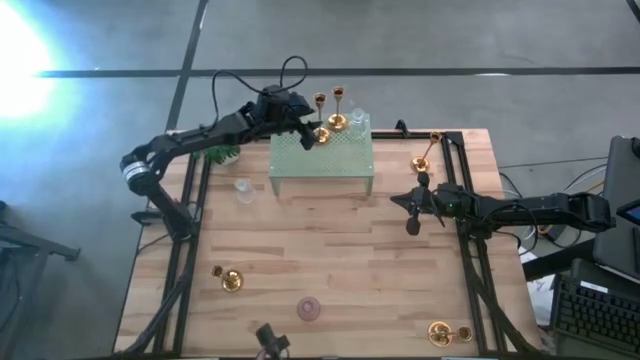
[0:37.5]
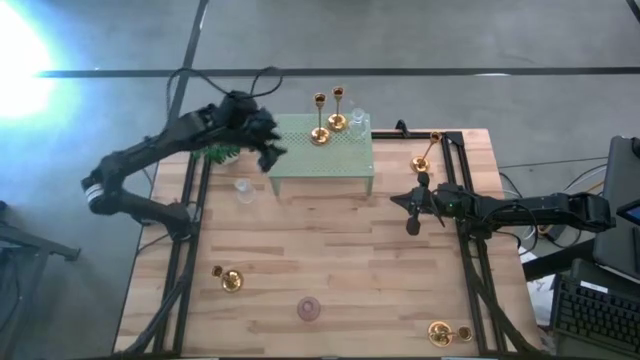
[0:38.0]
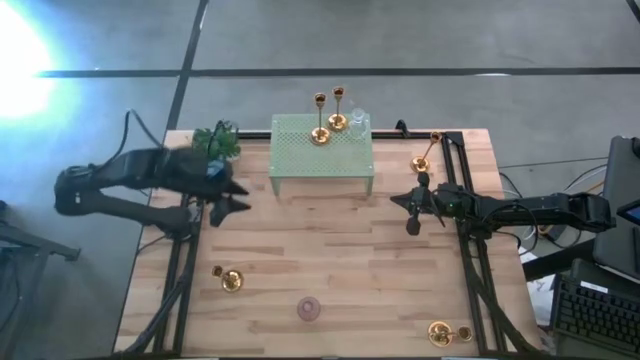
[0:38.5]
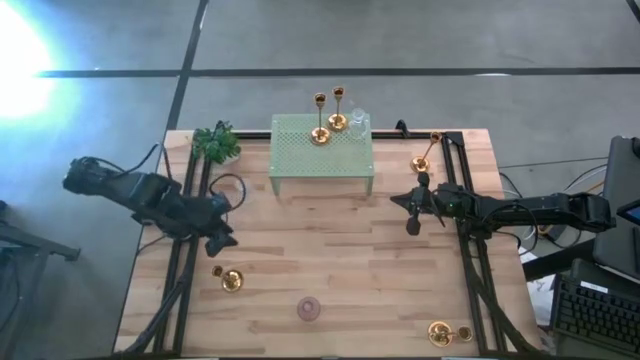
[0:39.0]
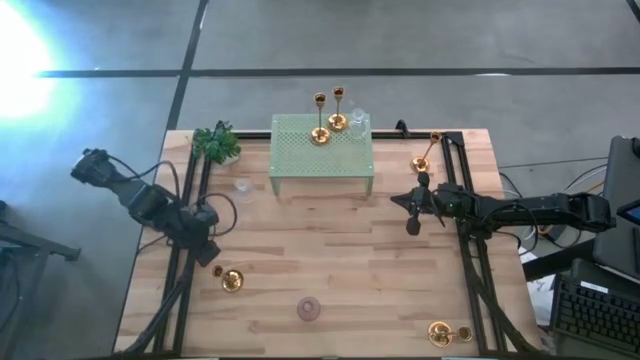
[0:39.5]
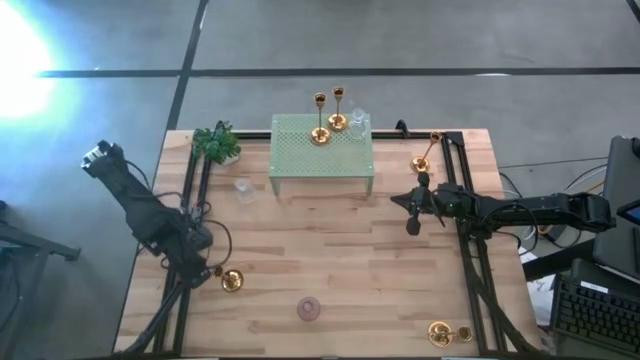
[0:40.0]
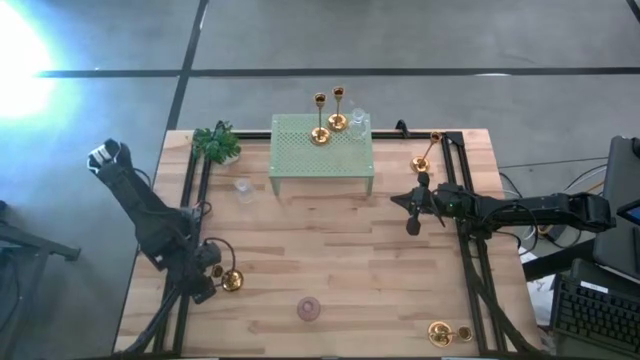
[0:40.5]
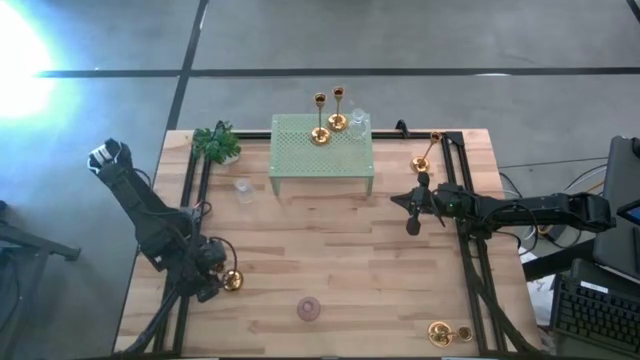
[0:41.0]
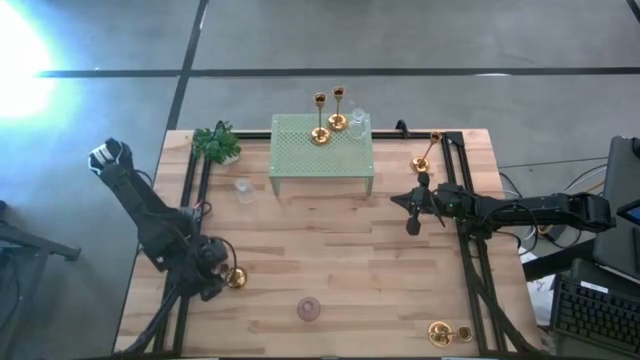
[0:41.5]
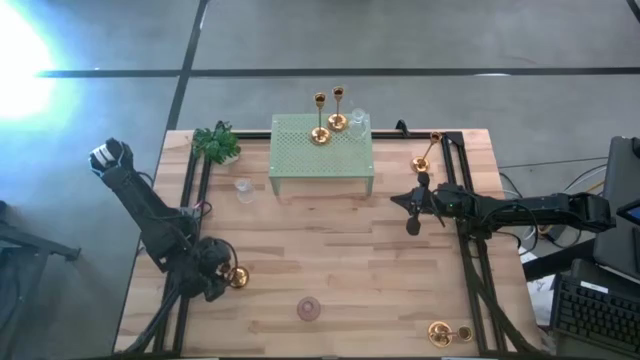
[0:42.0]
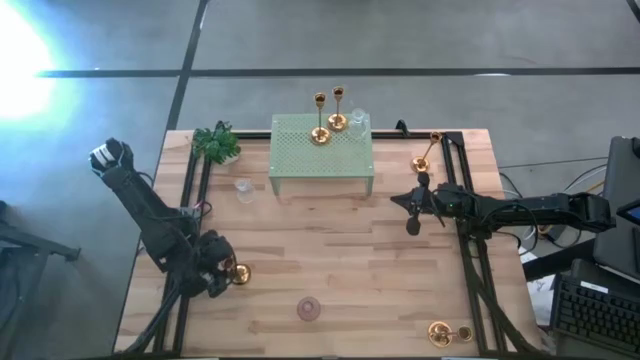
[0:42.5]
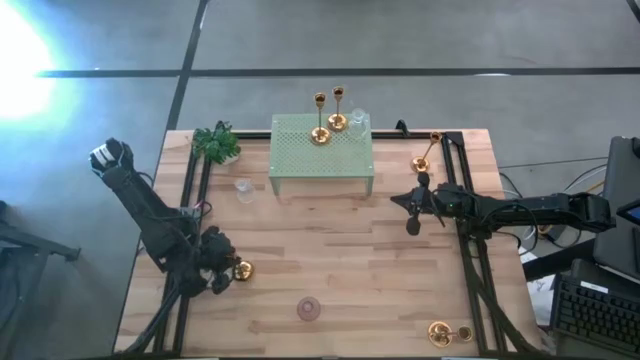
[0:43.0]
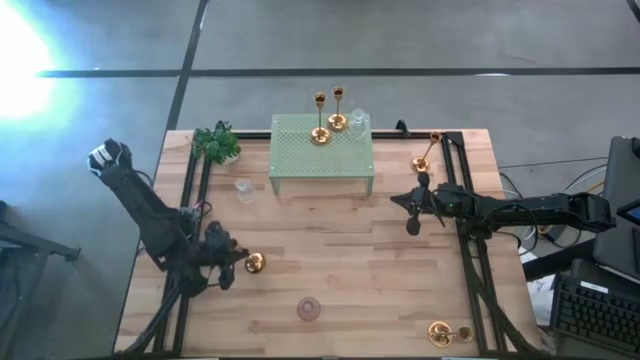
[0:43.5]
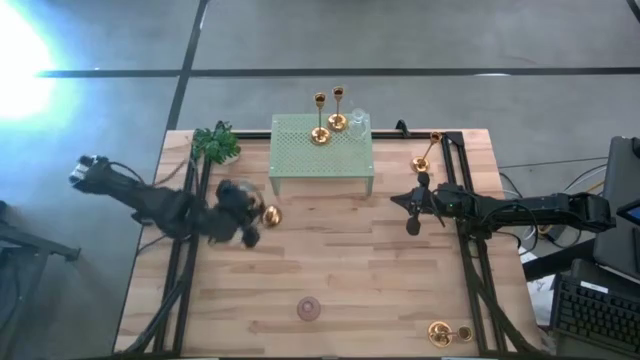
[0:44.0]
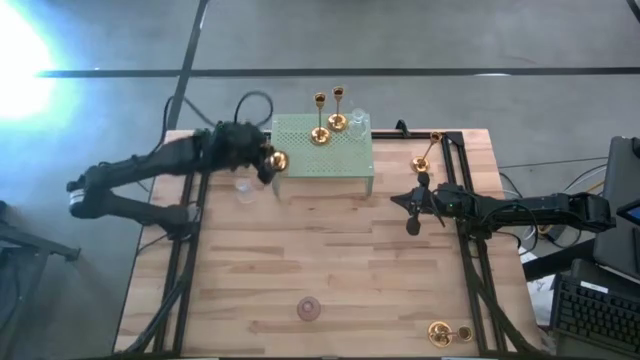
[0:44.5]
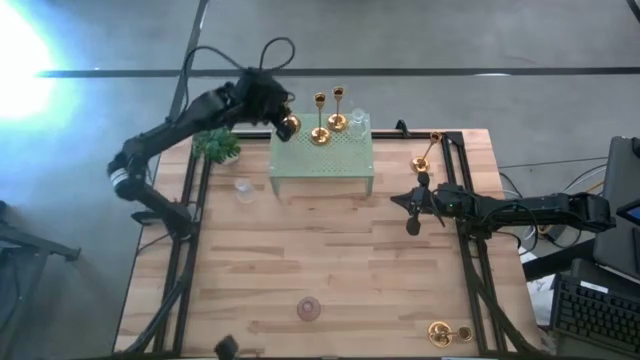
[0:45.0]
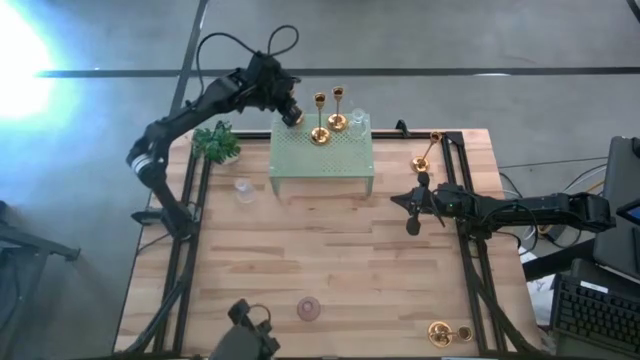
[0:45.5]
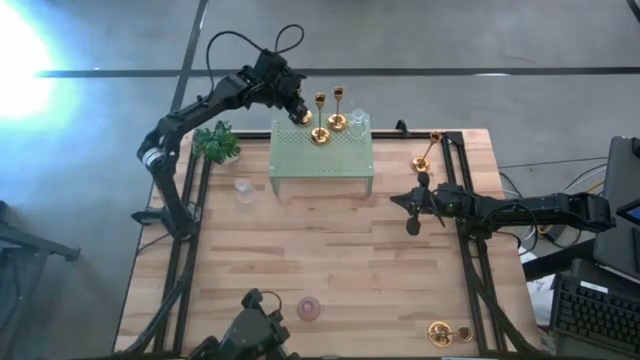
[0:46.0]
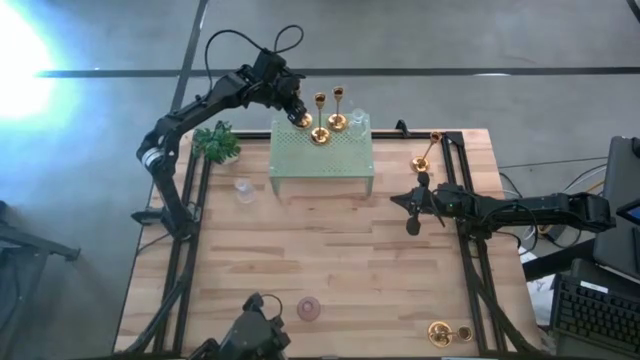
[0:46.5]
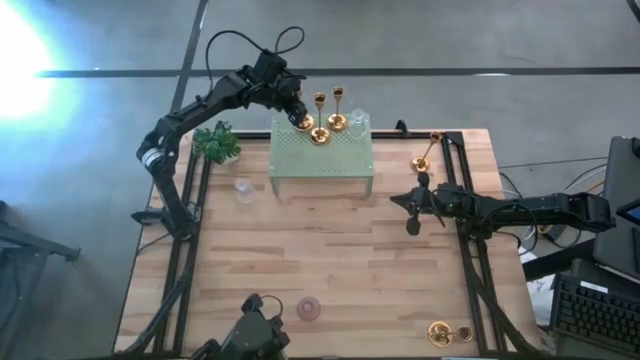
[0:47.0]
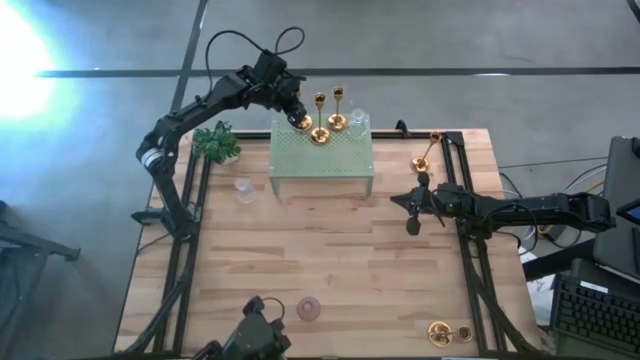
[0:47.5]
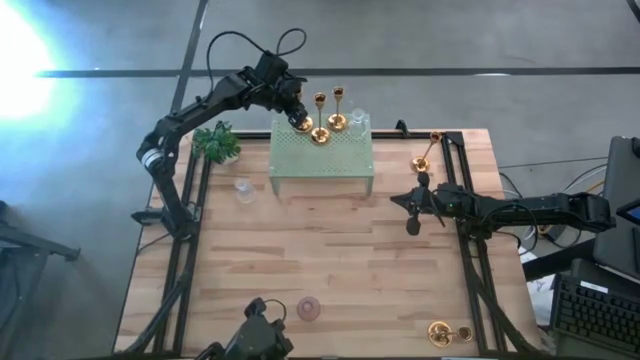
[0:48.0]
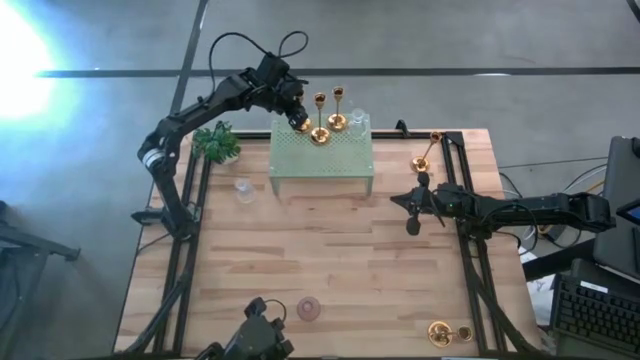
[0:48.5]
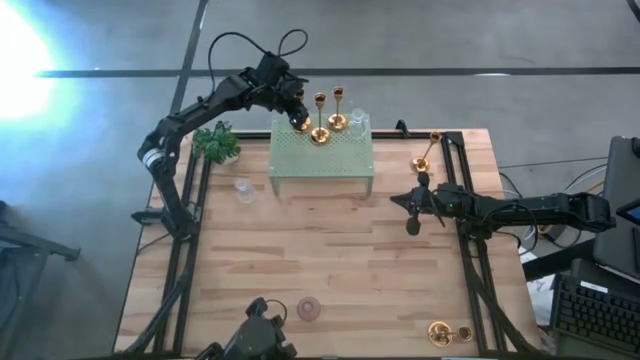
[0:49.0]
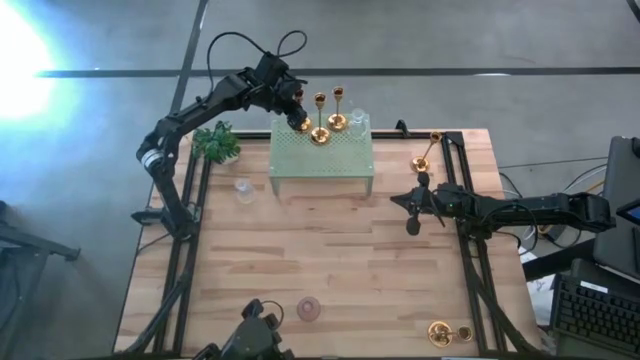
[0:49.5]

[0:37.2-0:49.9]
Task: Pick & Place candle stick holders
Put the gold candle holder on the shelf

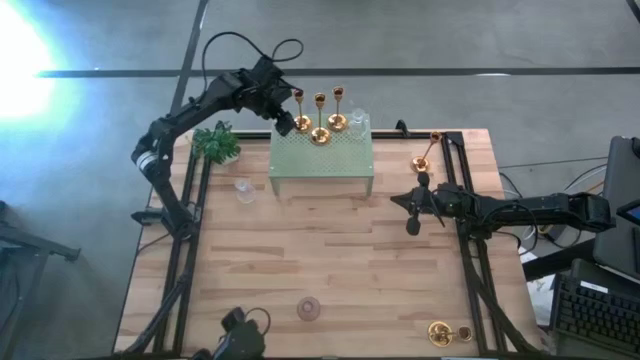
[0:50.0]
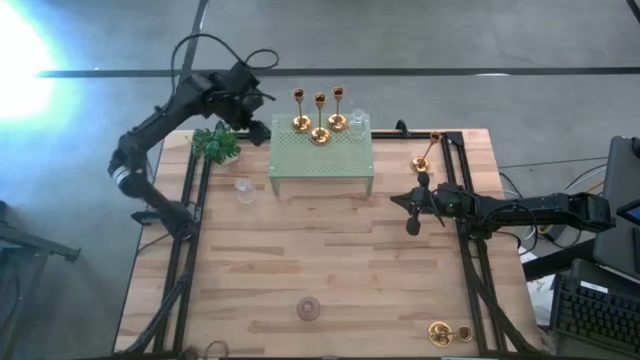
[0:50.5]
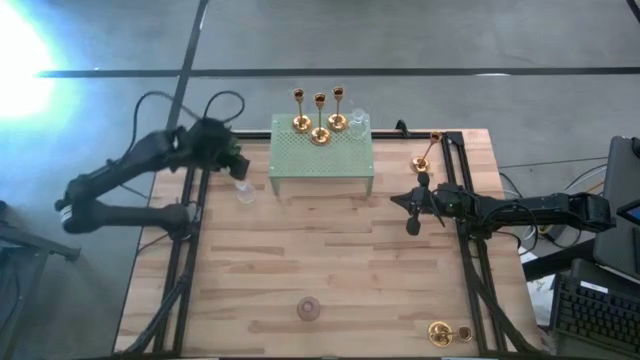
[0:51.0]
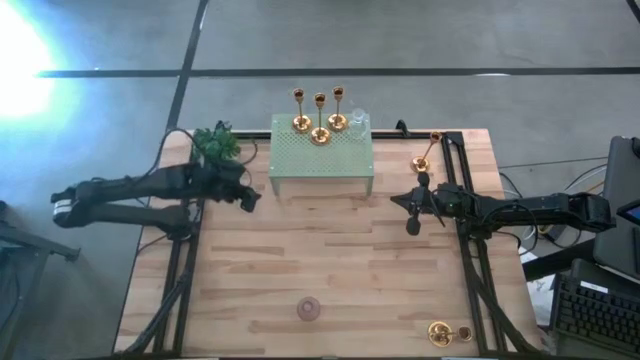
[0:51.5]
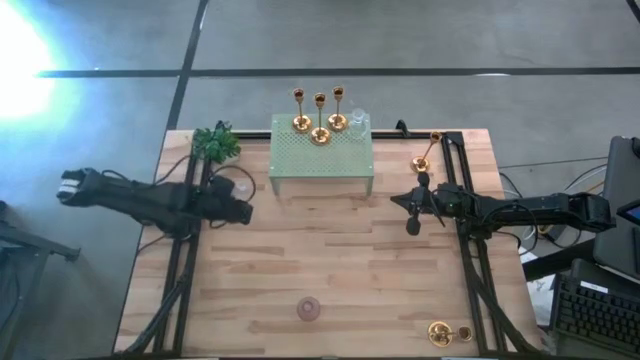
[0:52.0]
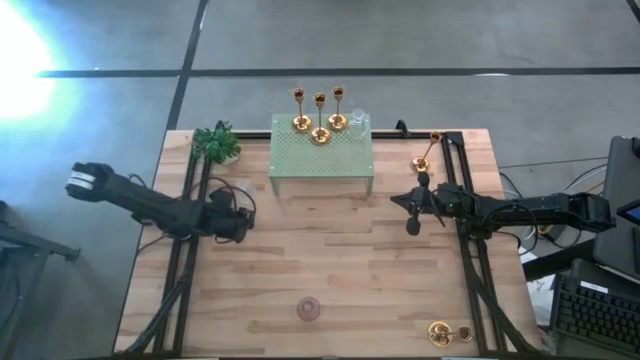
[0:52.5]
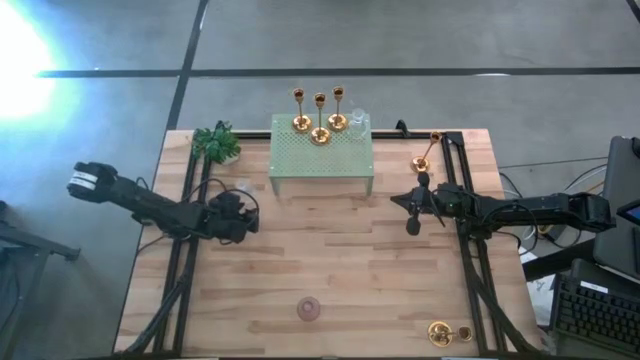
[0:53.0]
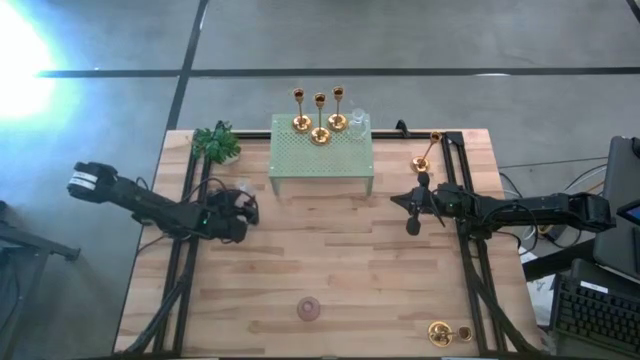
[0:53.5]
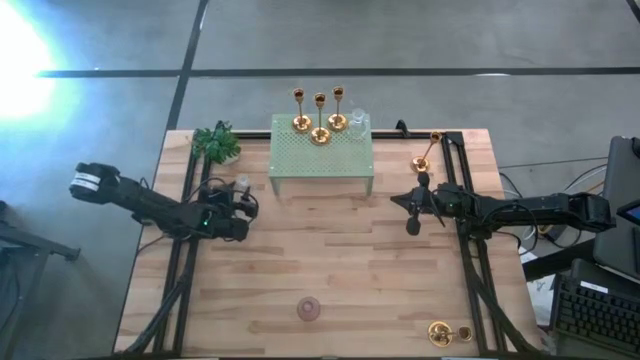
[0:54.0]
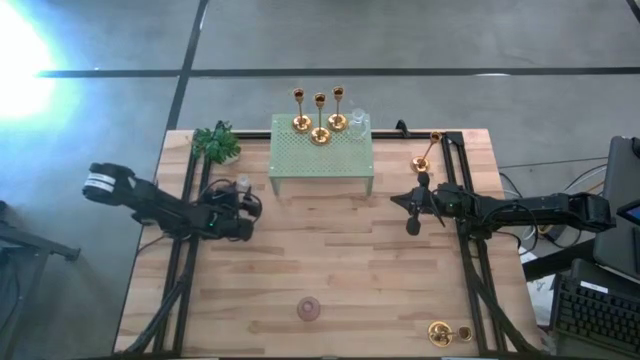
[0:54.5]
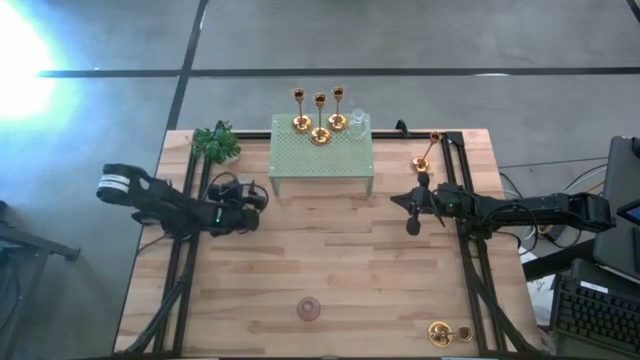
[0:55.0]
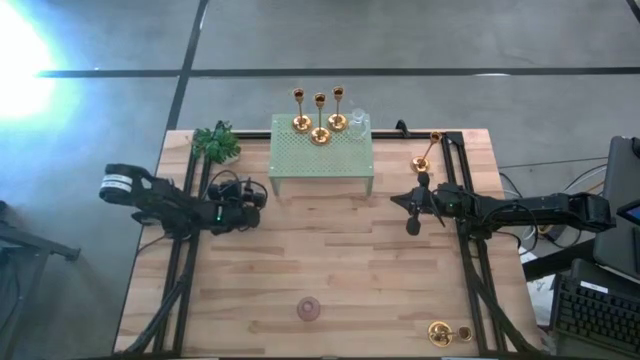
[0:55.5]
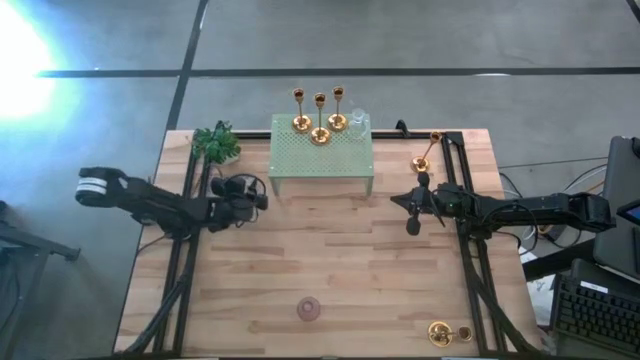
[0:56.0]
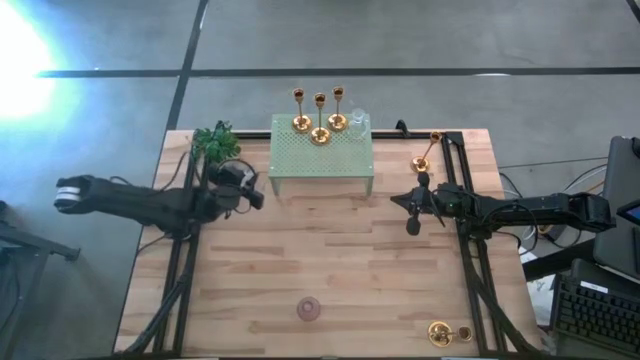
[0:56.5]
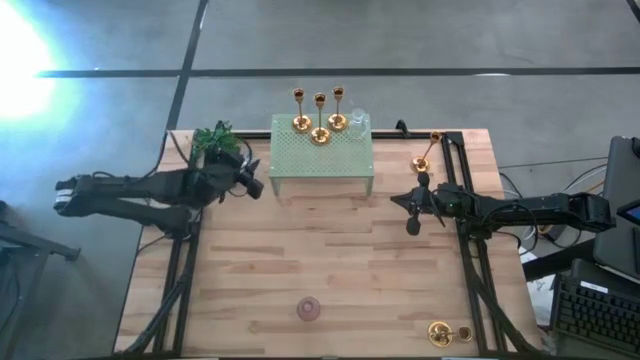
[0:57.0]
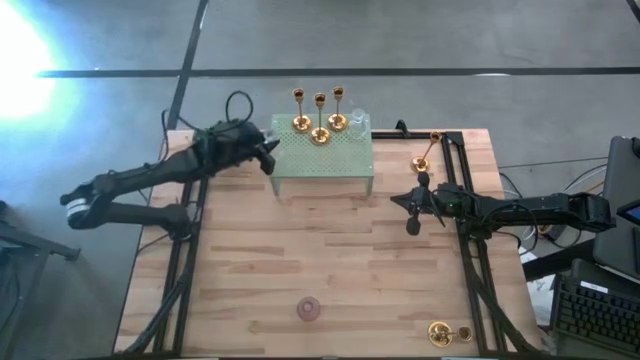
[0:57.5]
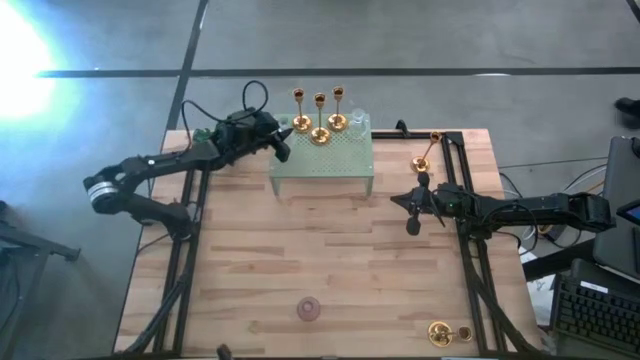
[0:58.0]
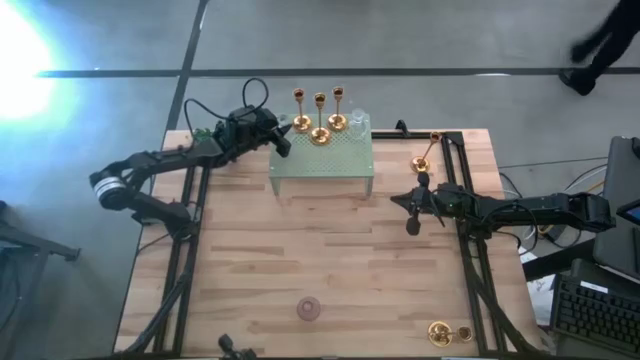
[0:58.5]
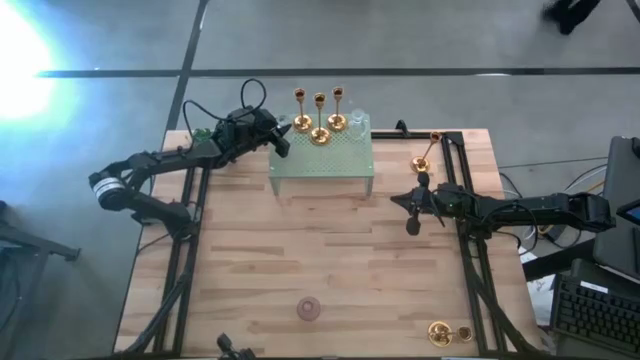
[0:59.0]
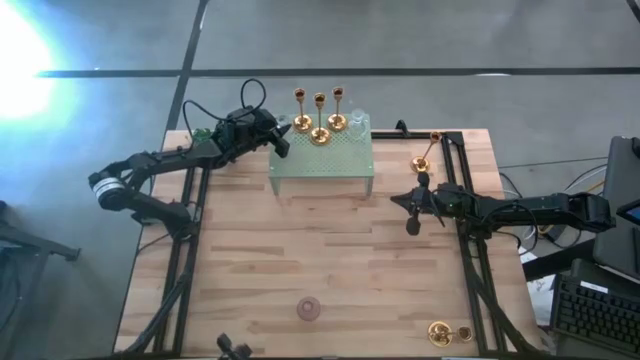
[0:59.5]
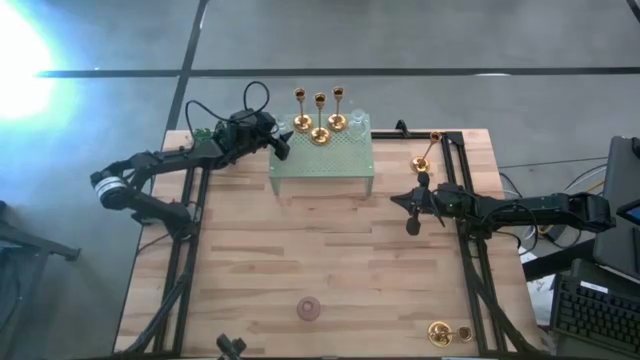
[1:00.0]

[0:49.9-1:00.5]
Put the transparent glass candle holder on the shelf
